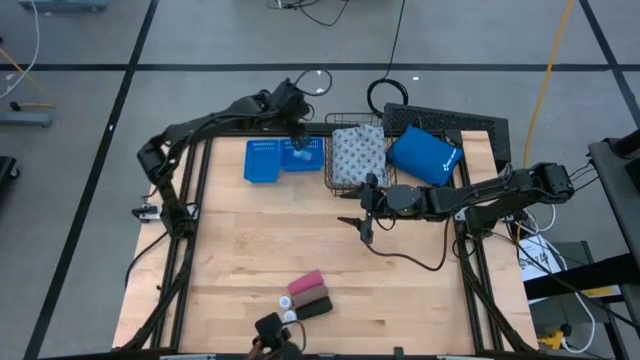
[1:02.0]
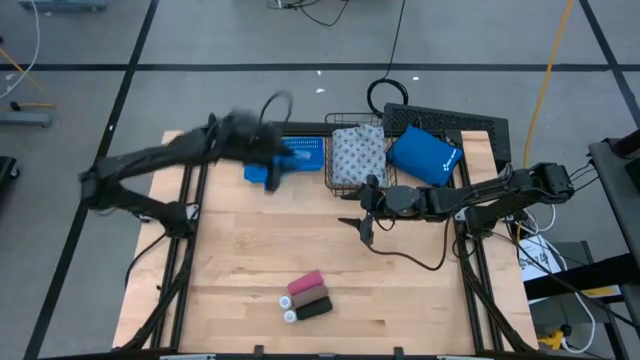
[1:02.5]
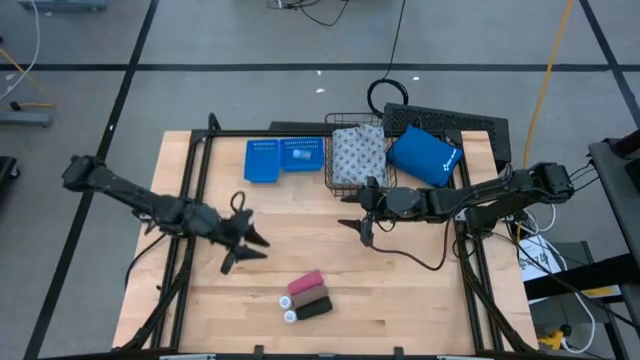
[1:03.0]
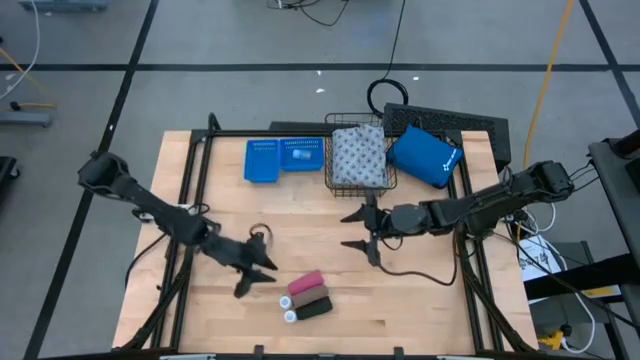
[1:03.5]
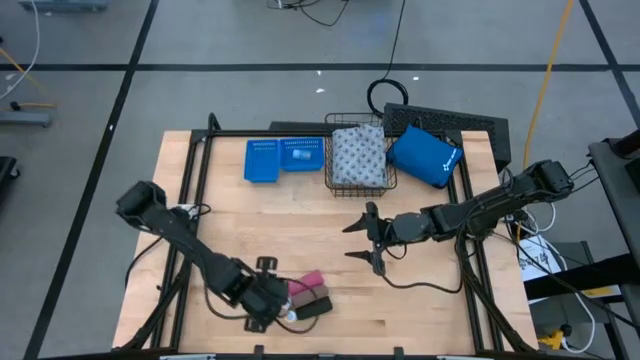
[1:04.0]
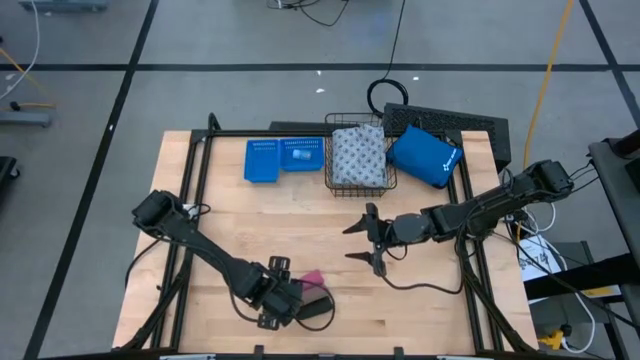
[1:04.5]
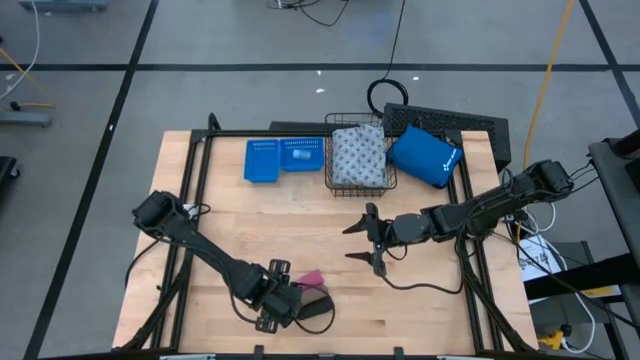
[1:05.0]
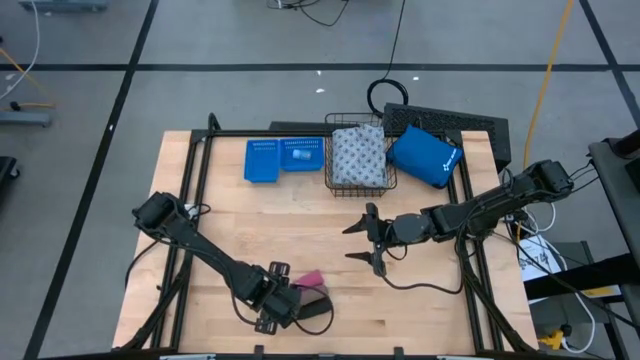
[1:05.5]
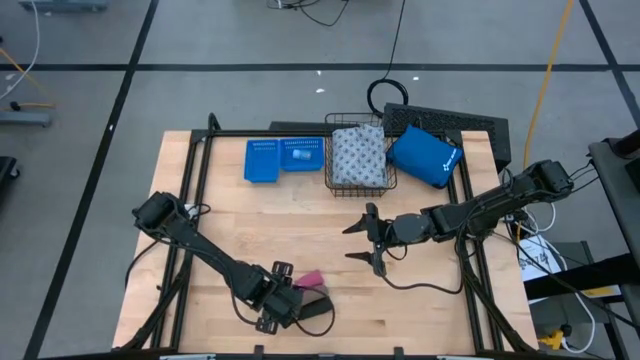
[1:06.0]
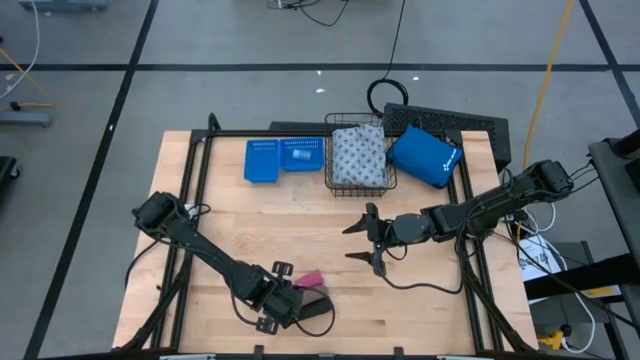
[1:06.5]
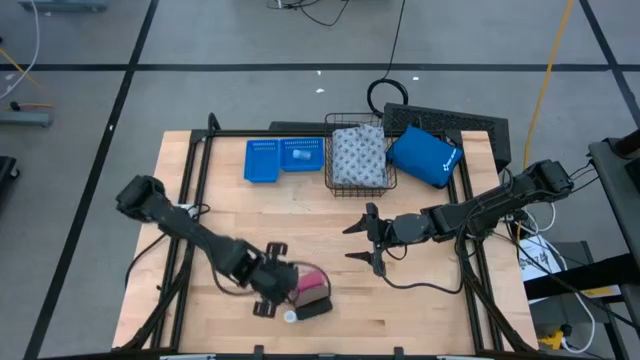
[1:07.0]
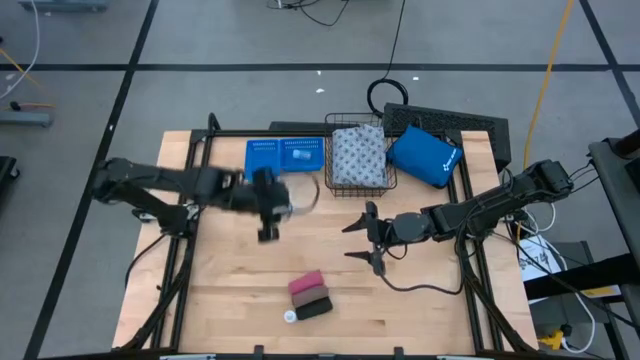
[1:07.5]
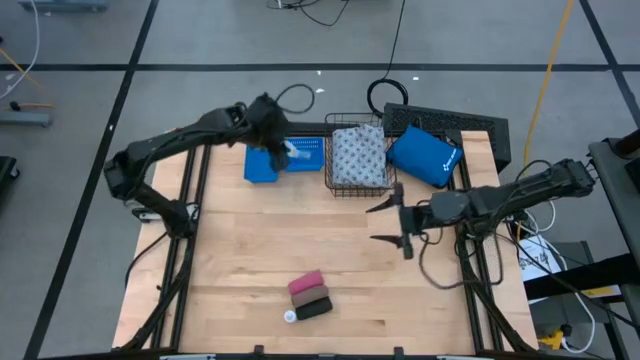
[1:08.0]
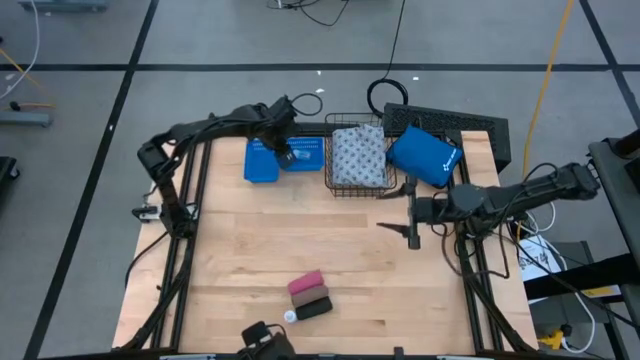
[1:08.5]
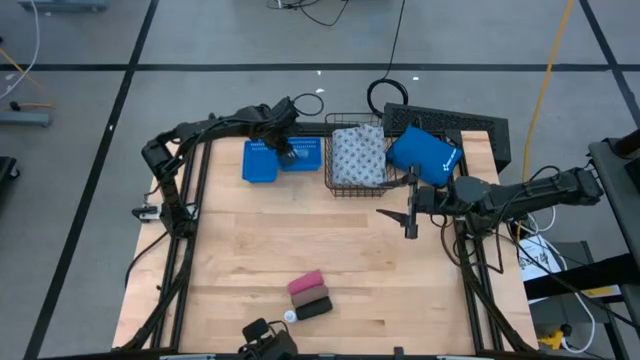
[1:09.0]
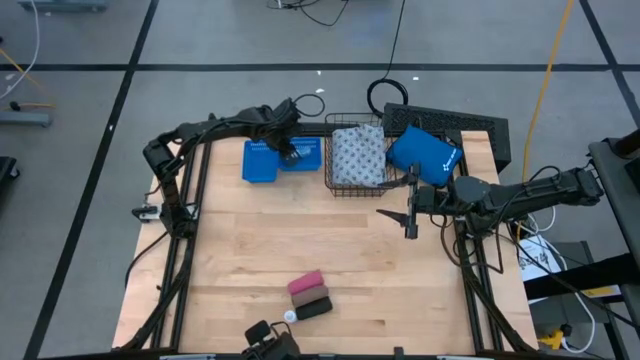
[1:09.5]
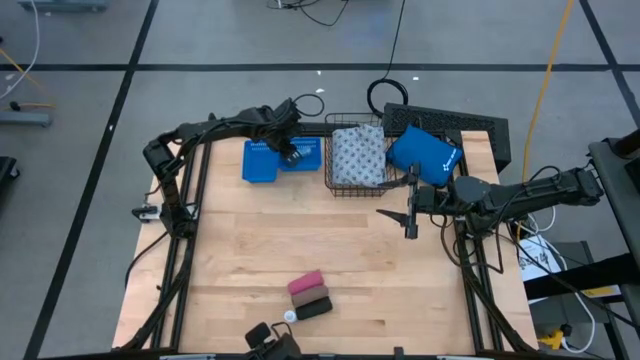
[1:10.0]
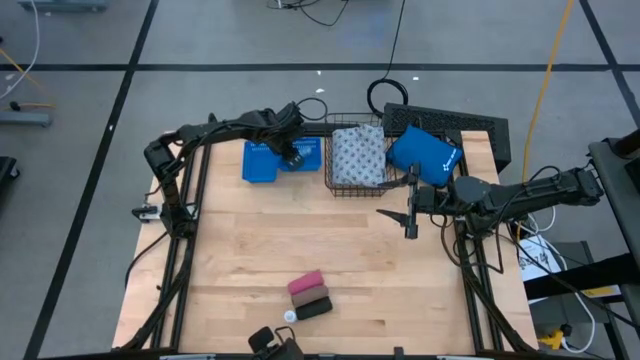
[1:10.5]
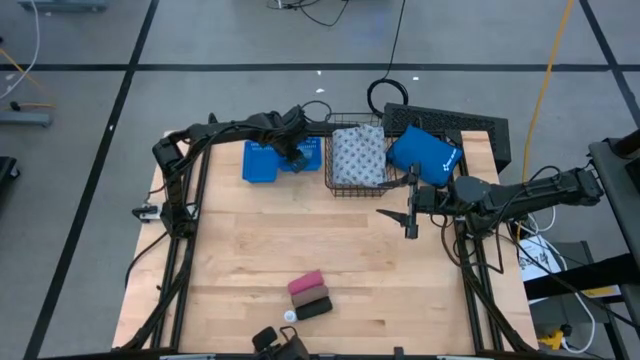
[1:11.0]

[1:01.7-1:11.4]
Task: Pick & Place Medicine items
Put the top white pill bottle into the right blue bin

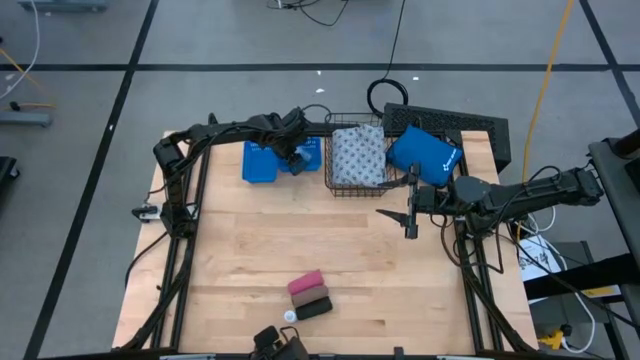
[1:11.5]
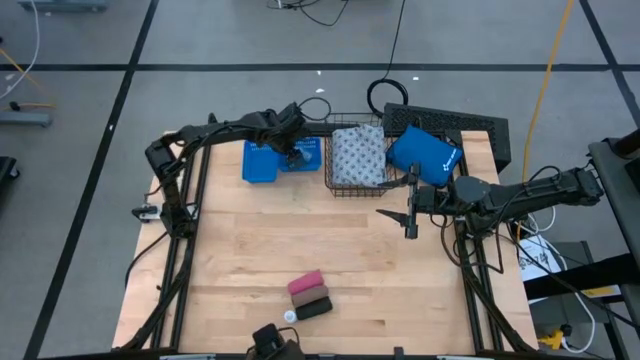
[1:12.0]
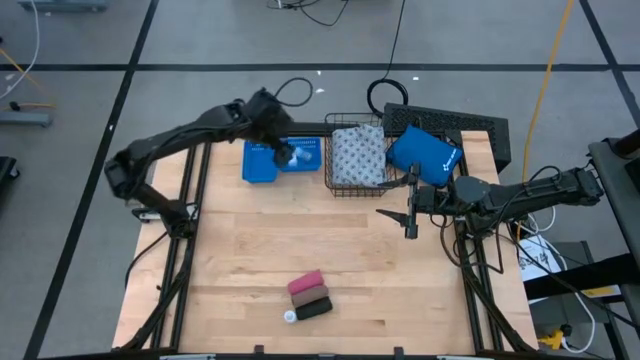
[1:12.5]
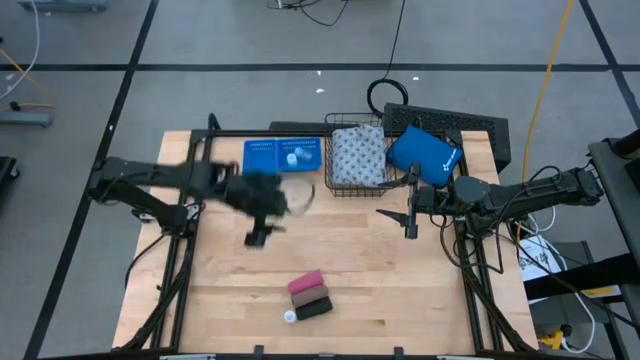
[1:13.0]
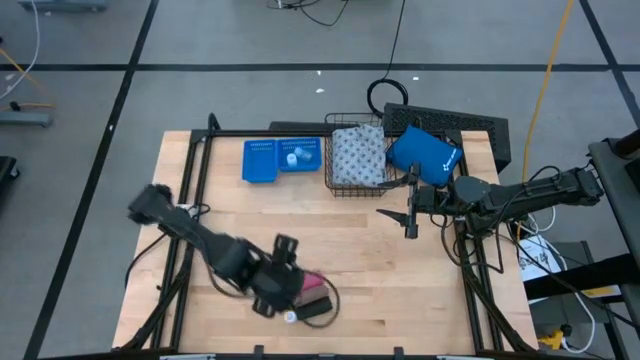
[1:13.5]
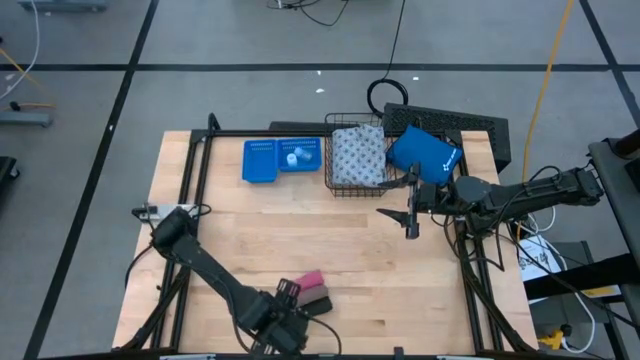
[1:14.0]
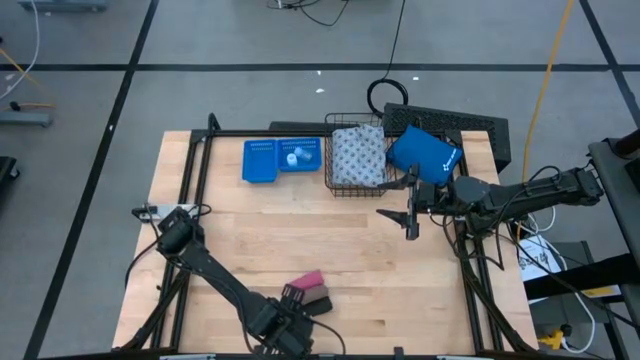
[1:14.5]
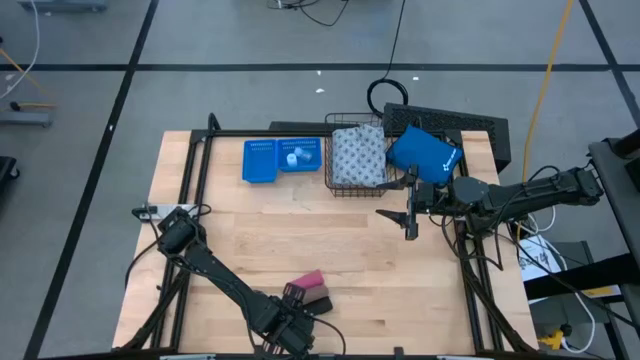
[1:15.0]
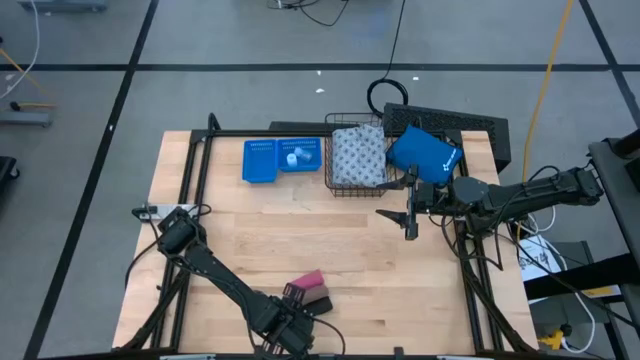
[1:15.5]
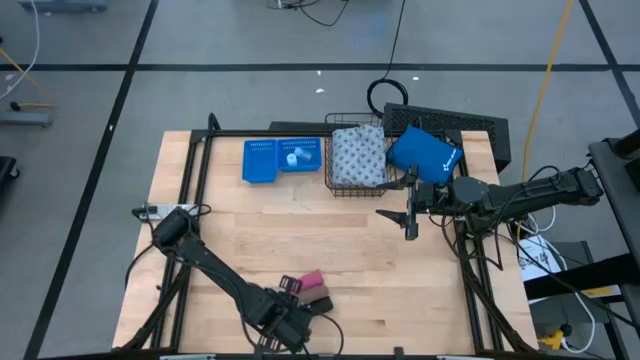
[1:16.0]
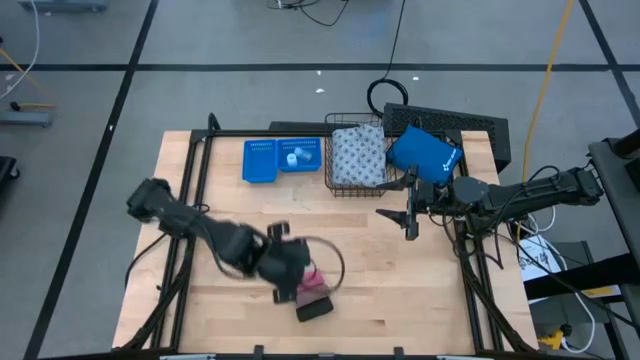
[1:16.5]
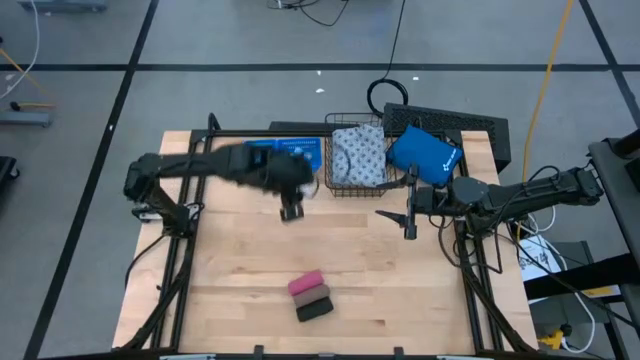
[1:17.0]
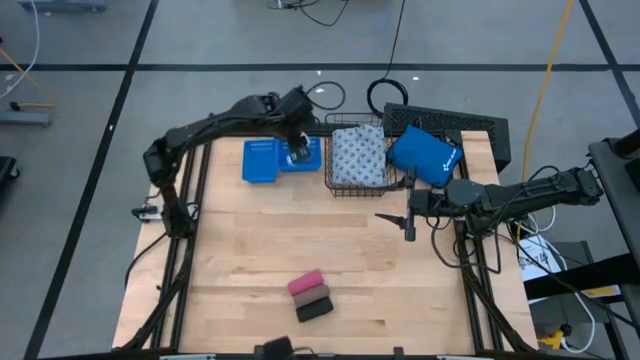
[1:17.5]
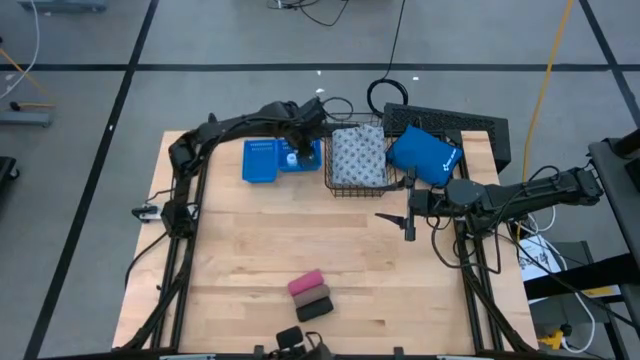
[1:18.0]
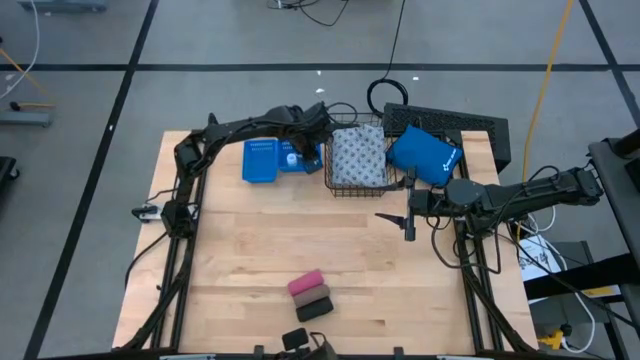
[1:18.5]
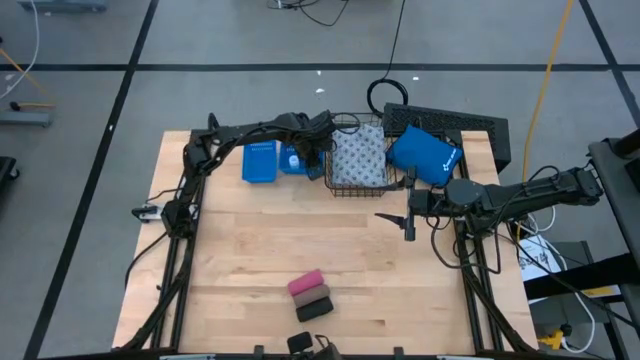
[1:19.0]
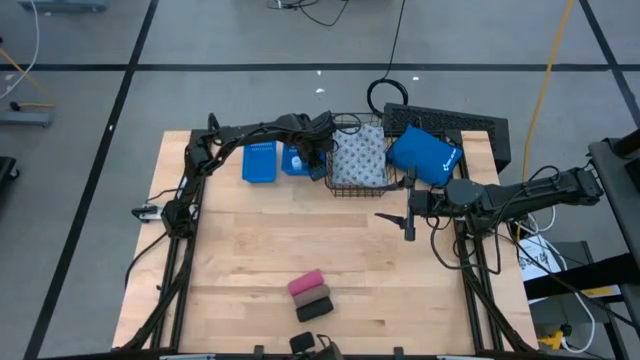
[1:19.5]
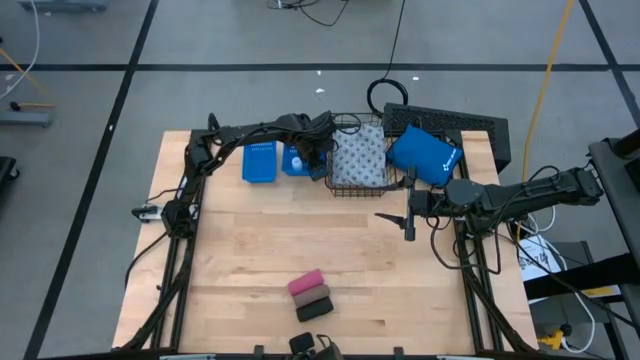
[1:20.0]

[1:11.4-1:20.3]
Put the white pill bottle into the right blue bin

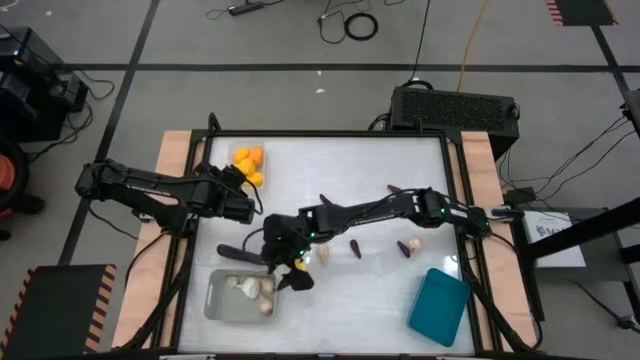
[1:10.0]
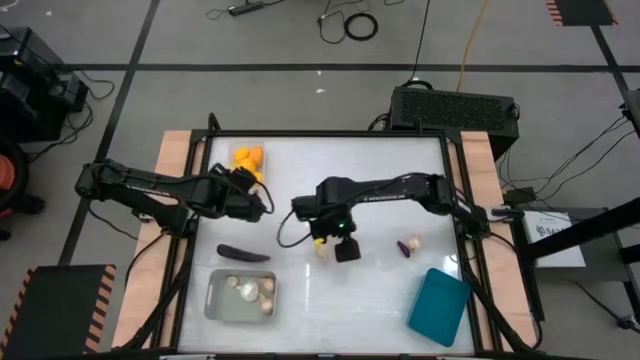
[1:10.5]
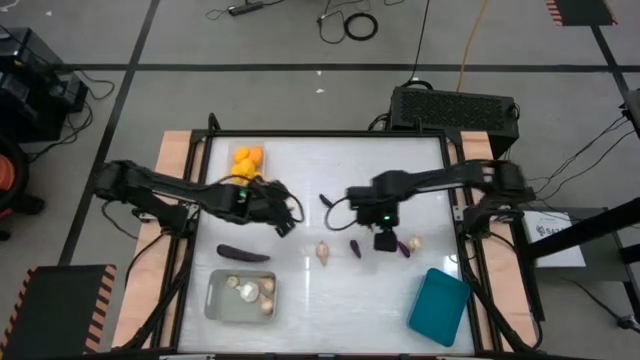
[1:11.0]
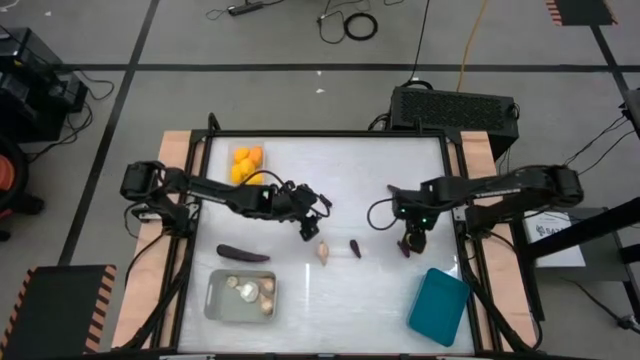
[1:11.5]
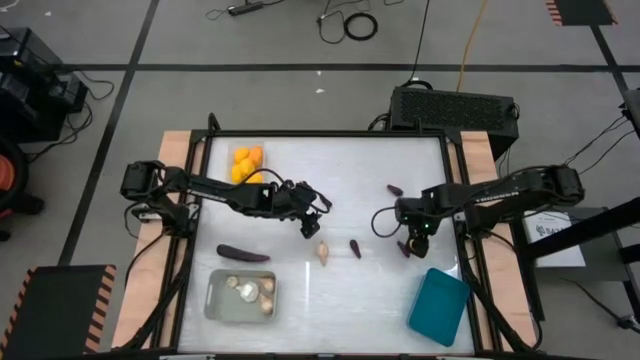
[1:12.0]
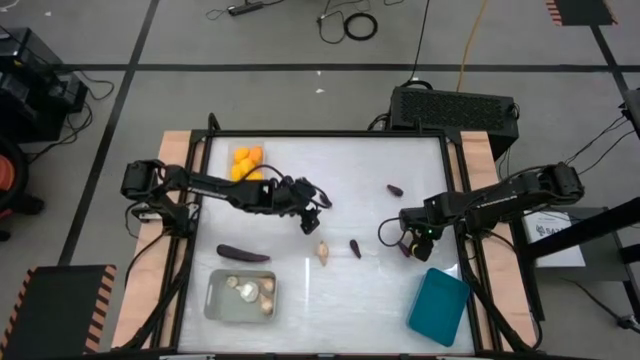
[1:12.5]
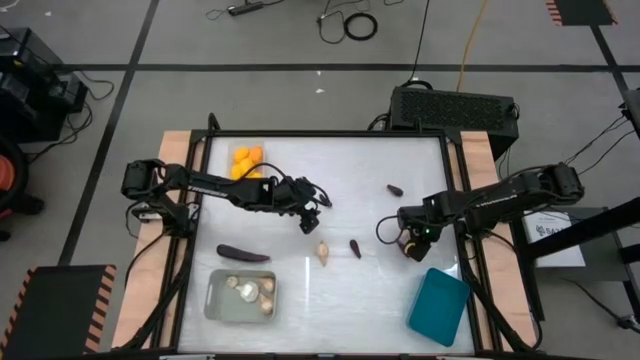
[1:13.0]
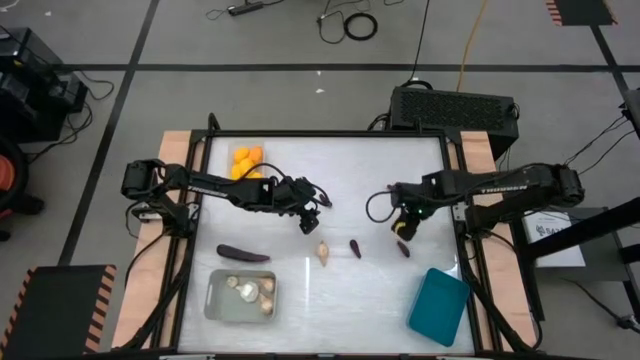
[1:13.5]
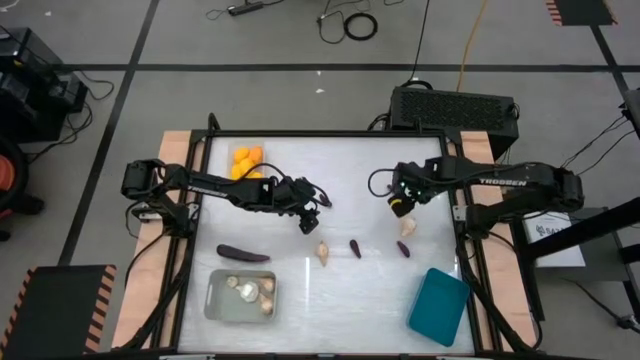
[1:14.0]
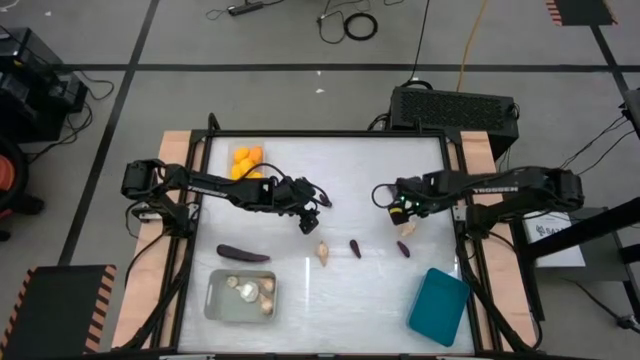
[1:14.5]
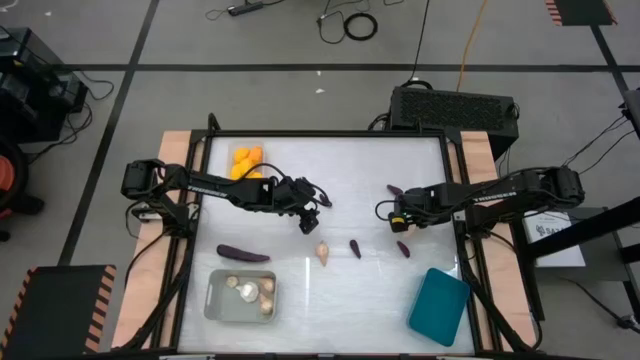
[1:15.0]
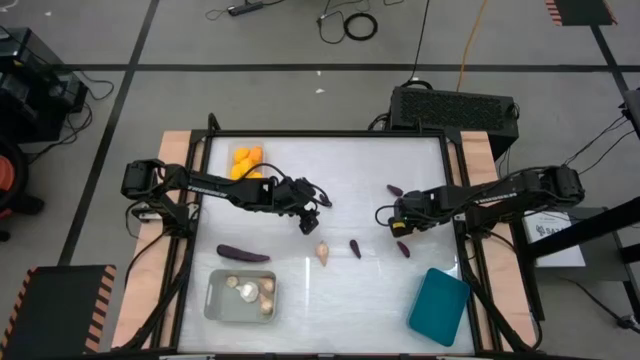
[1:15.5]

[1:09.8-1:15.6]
Task: Sort produce into baskets
Put the white garlic into the gray bin
